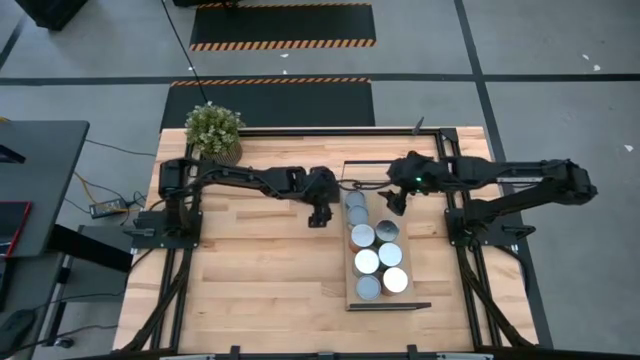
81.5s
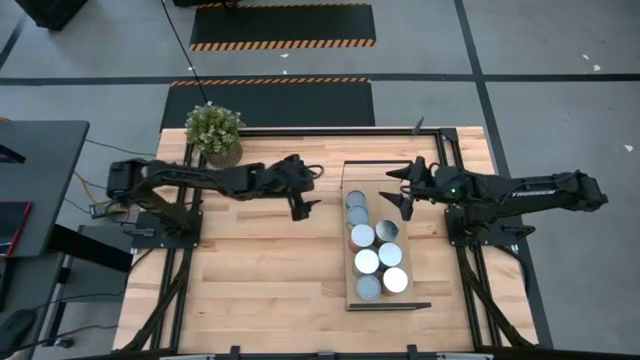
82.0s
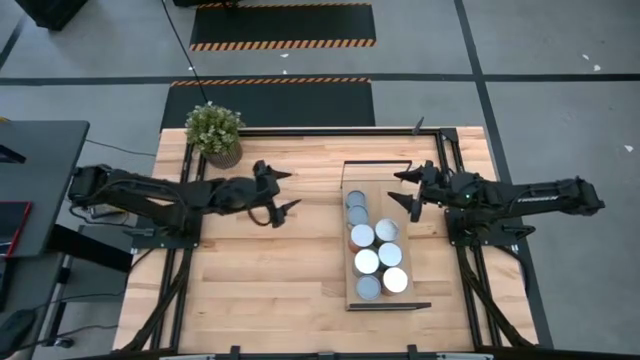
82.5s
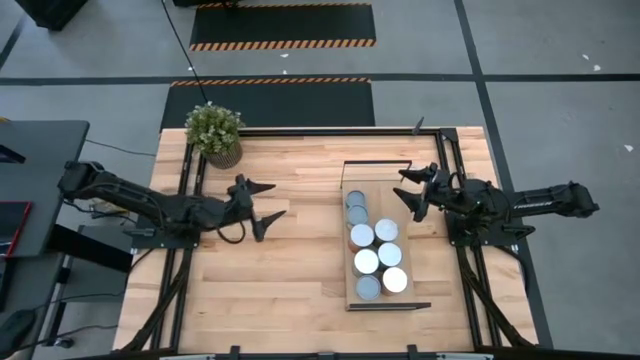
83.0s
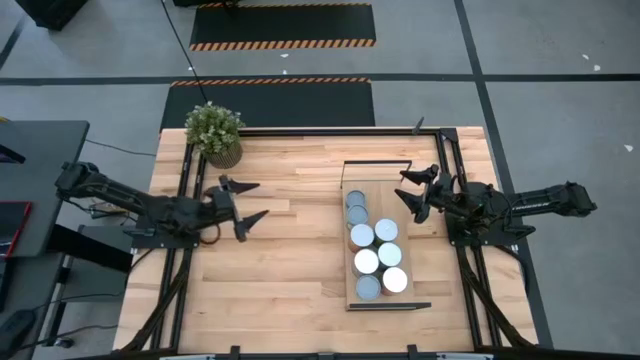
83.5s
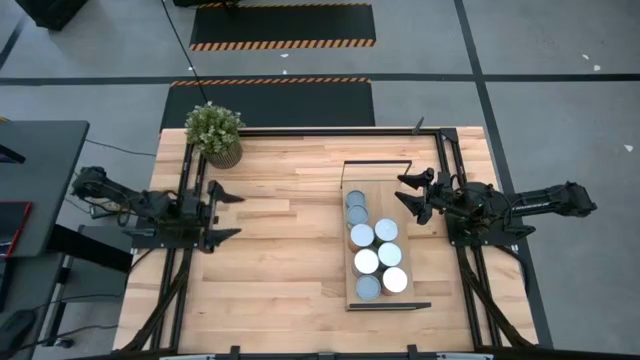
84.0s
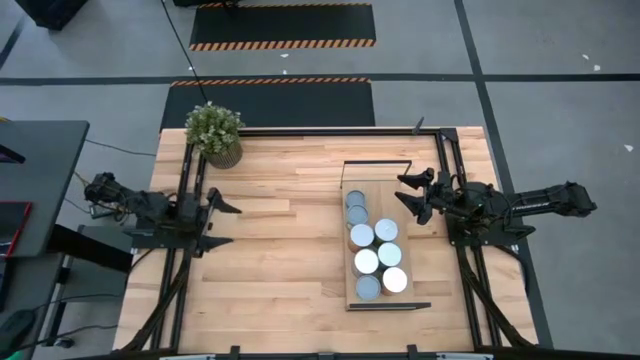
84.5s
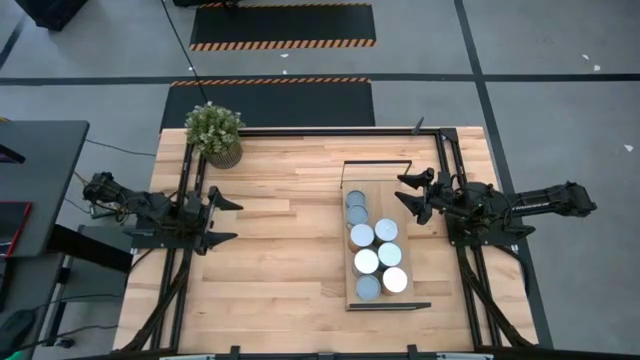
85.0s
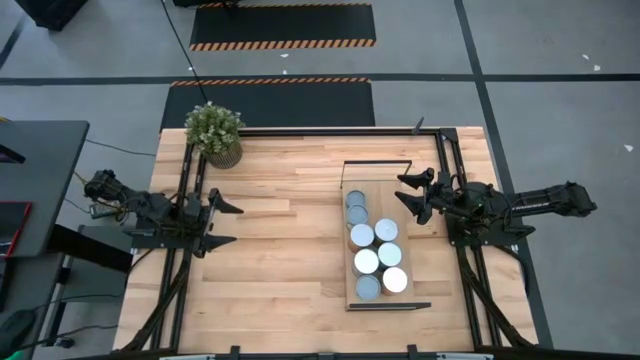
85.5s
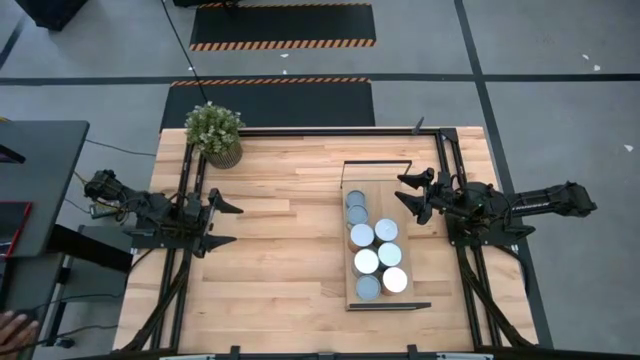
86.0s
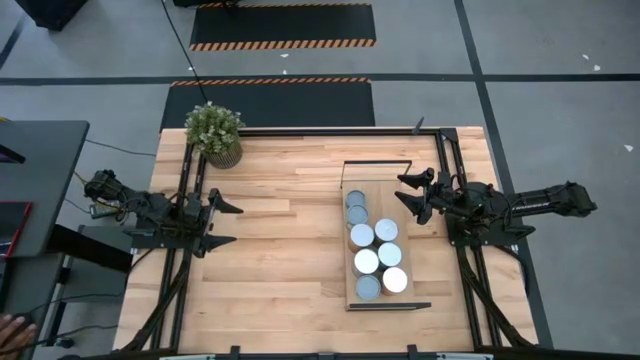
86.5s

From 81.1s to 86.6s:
Task: Pick and place cans onto a shelf
Return to Home Position

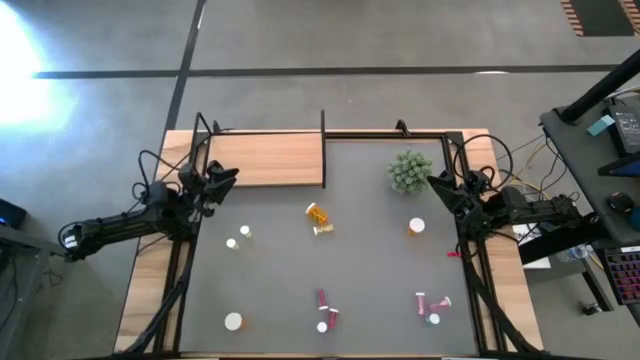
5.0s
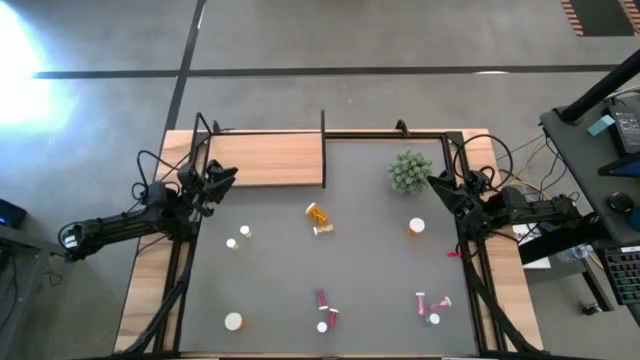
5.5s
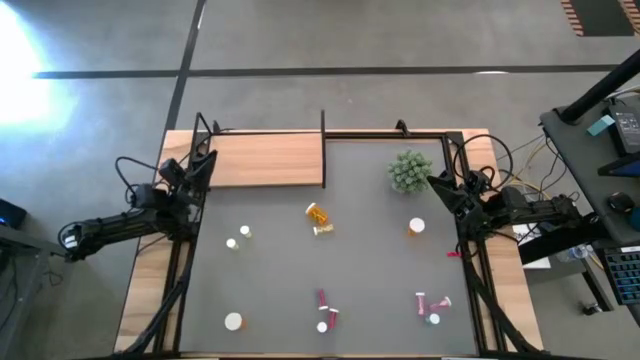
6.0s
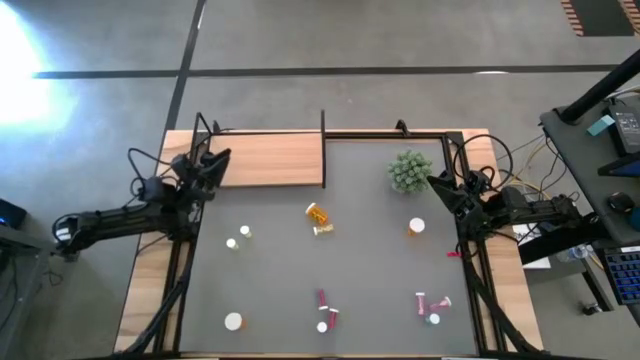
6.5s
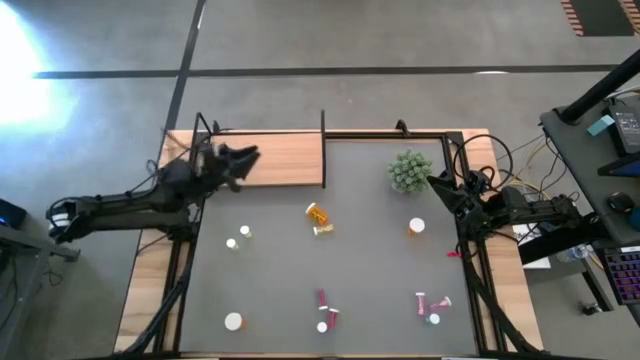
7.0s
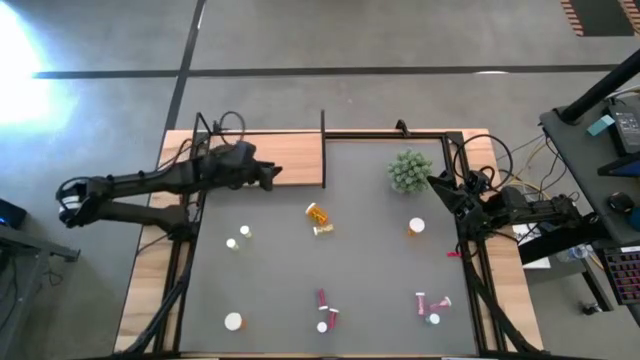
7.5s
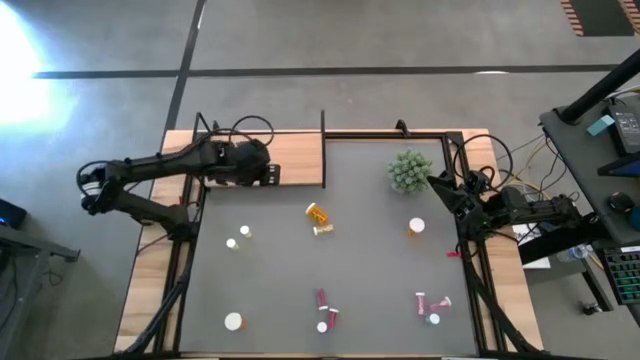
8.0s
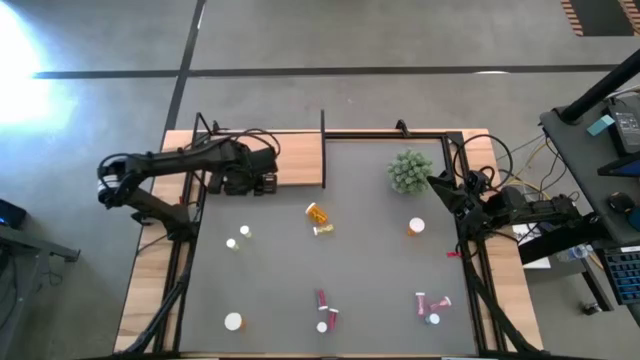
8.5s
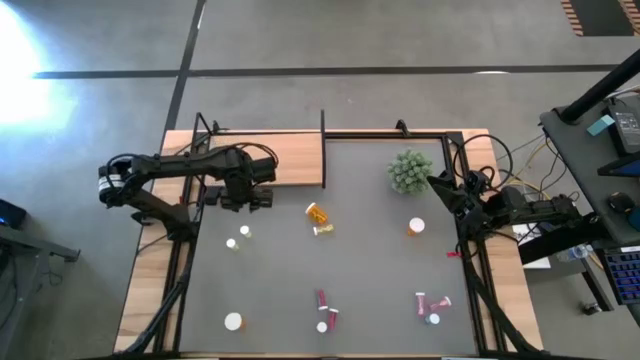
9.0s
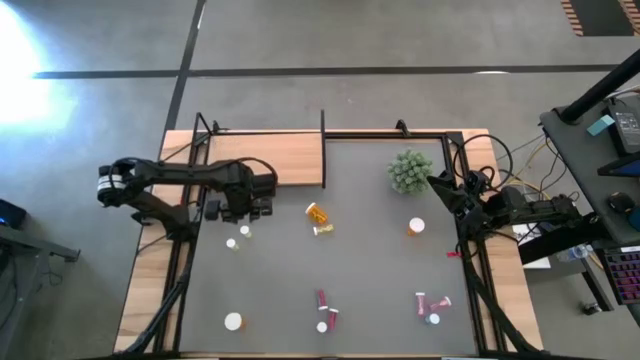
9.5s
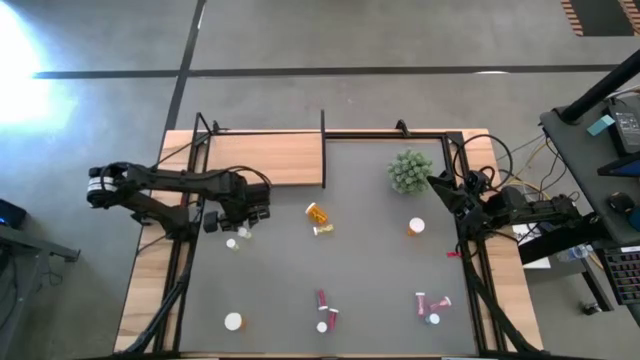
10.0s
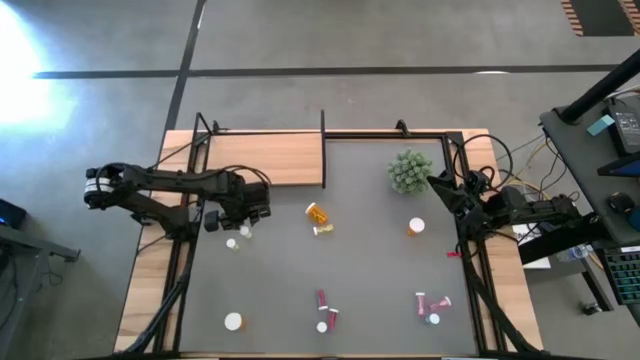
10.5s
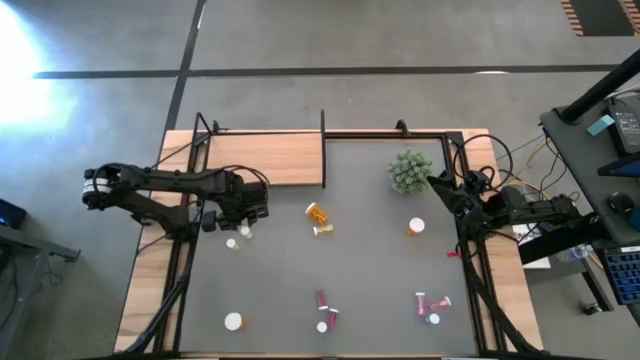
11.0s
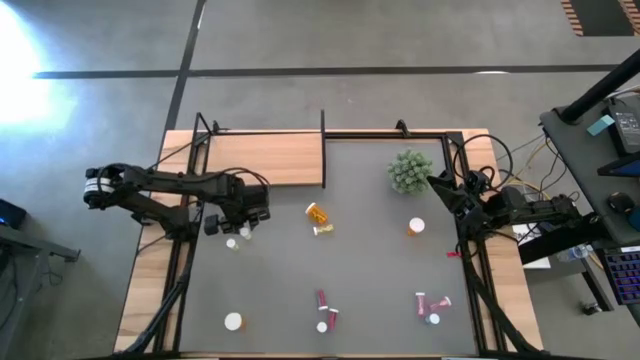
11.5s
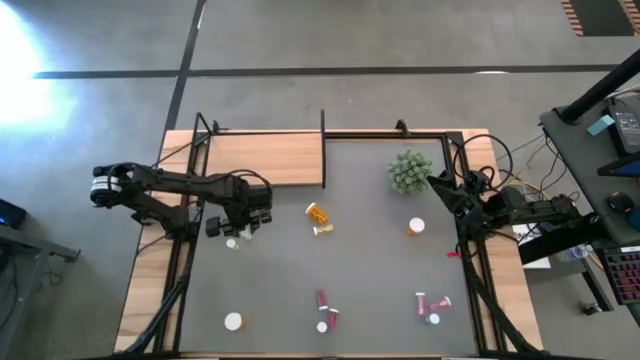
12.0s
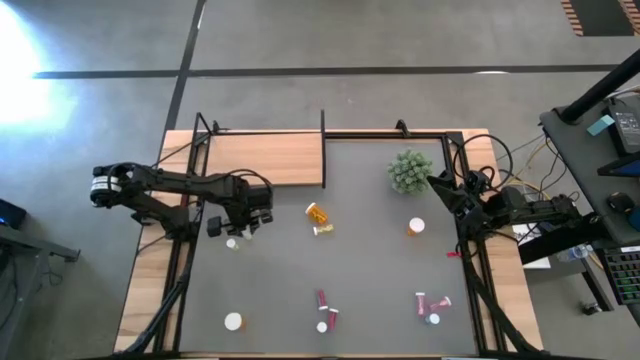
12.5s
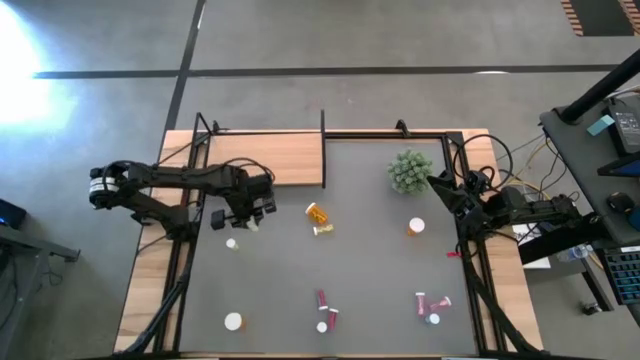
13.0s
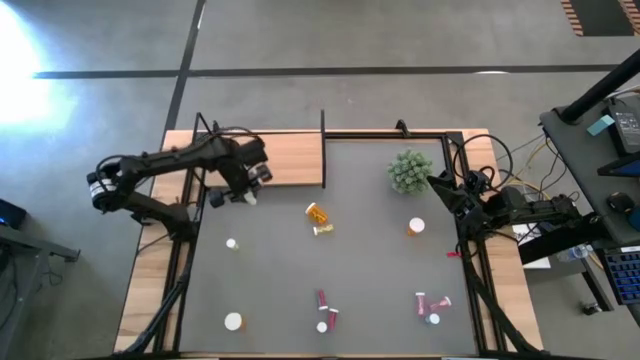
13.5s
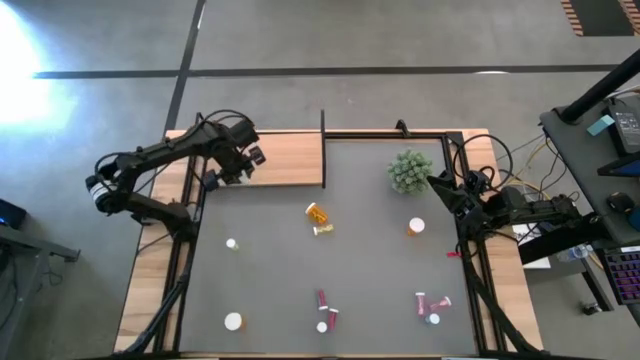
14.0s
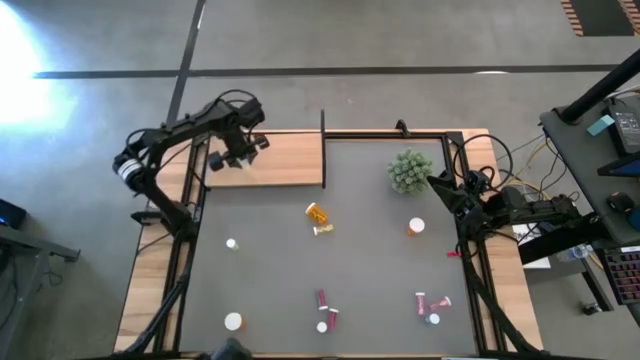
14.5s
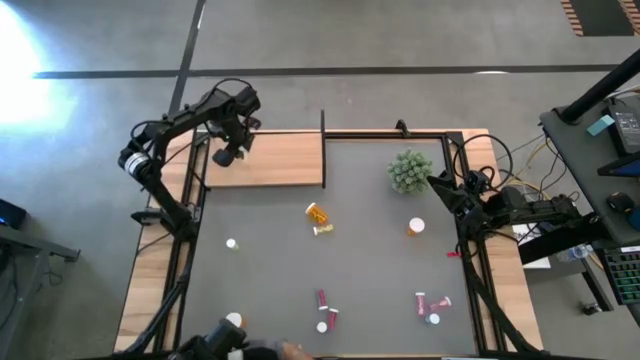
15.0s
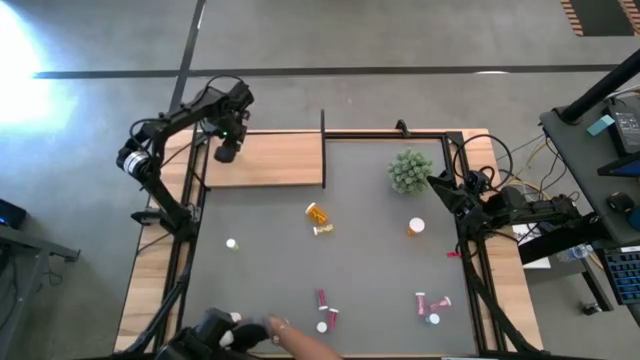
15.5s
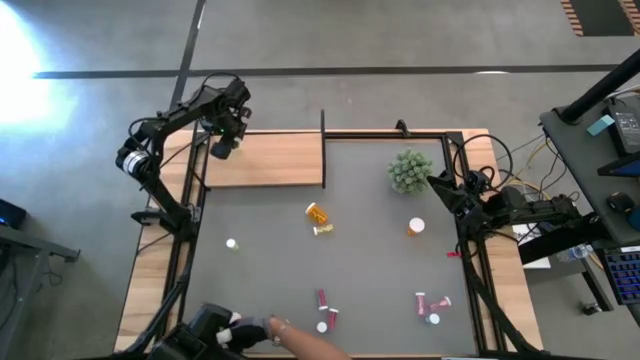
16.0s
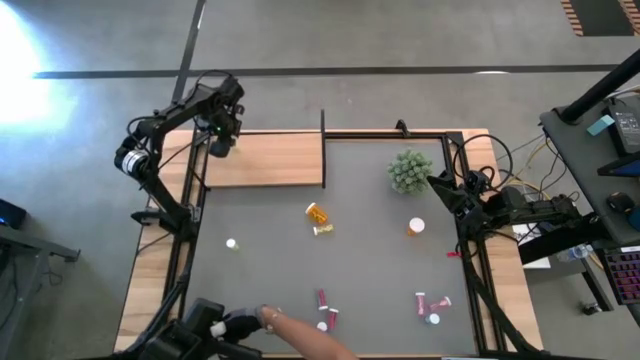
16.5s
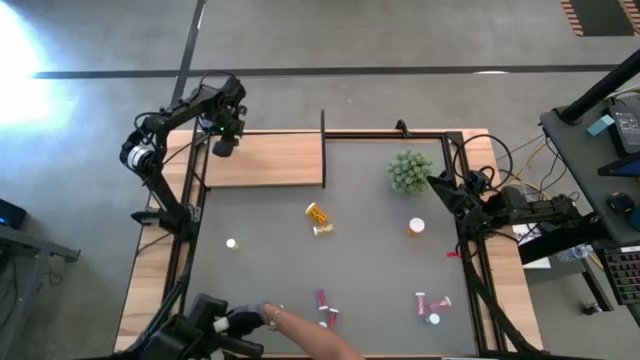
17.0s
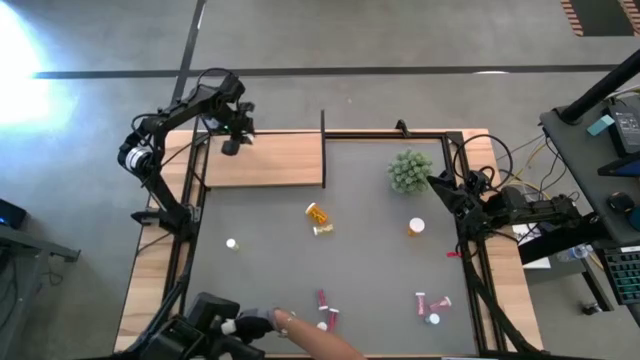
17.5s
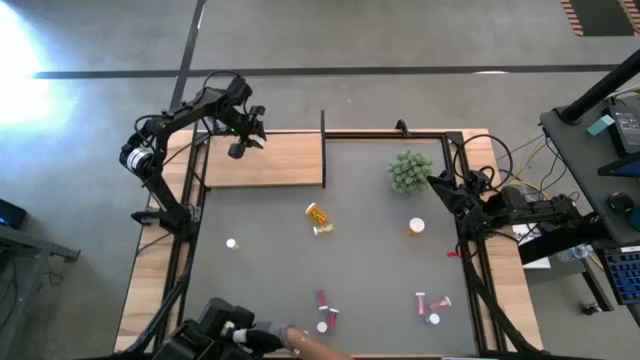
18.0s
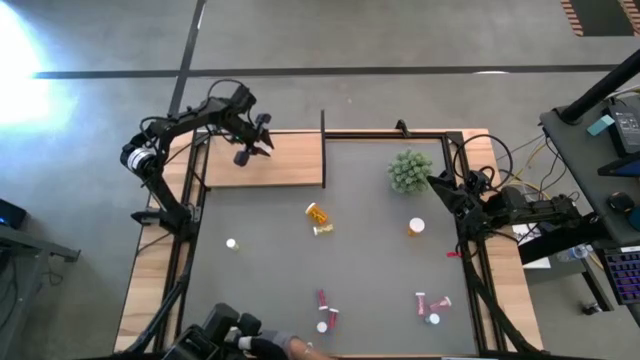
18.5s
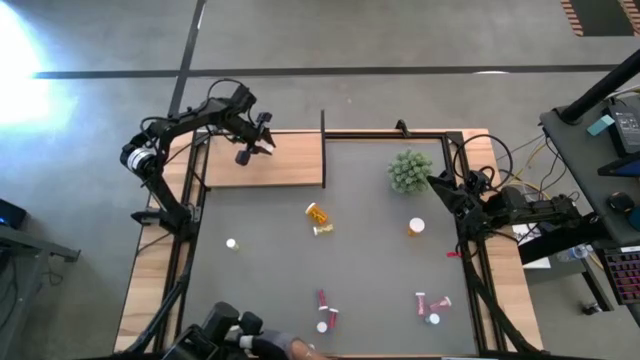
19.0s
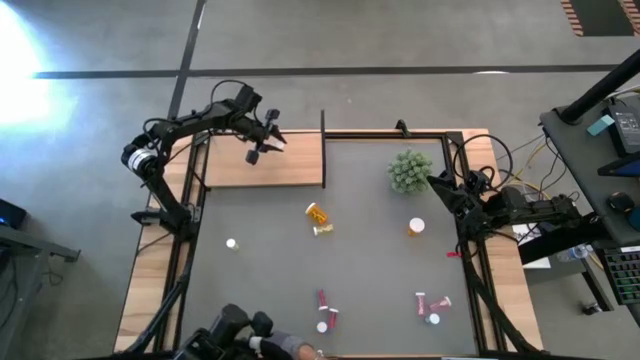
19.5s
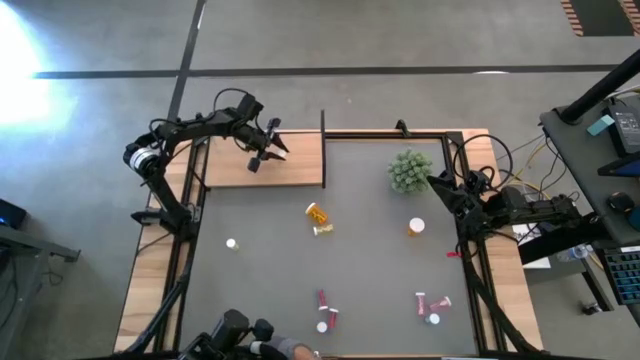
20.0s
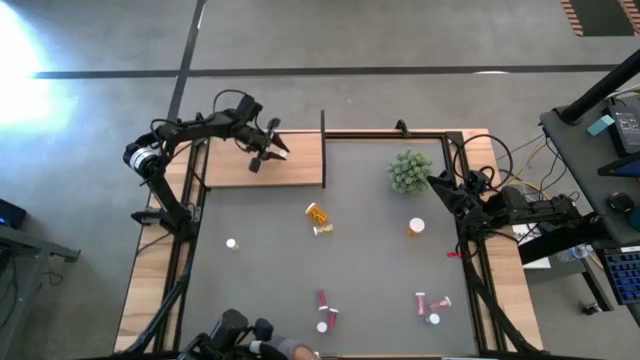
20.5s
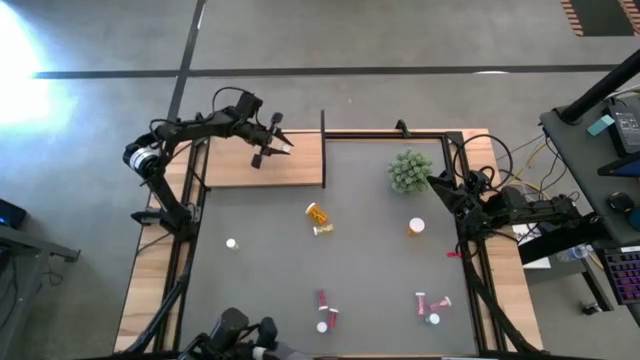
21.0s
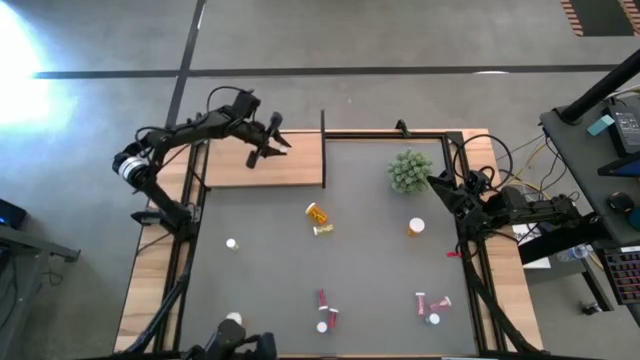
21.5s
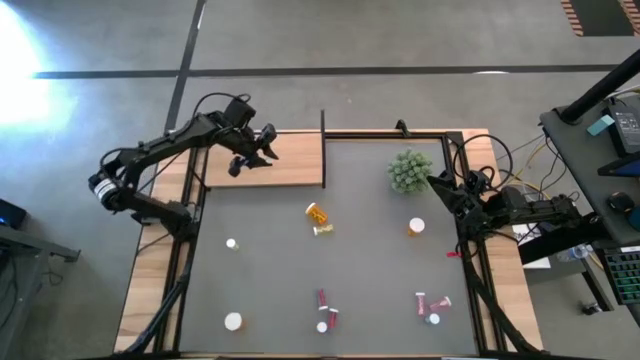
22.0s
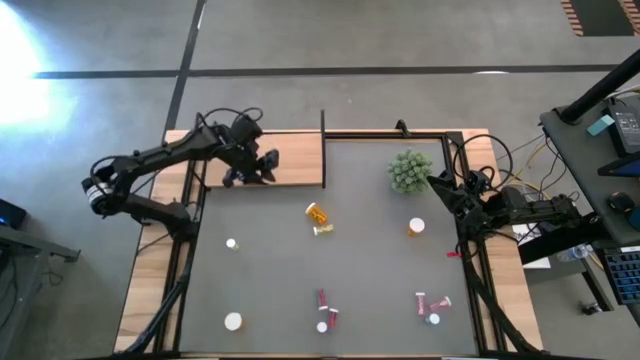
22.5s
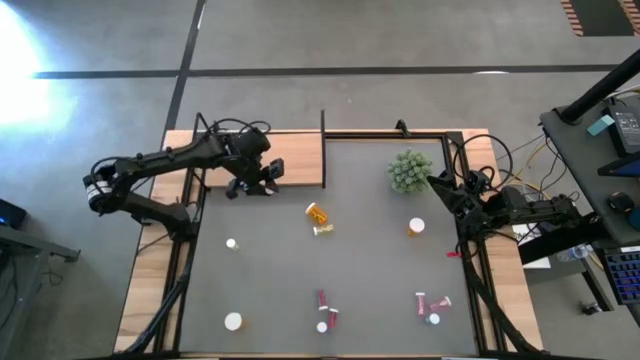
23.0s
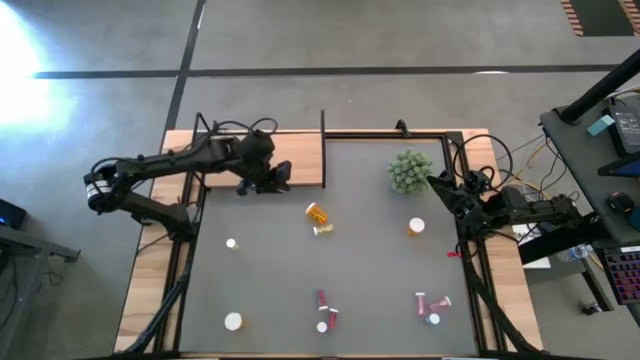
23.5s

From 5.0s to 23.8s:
Task: Pick and place medicine bottles onto shelf by color
Put the top left yellow pill bottle on the shelf
